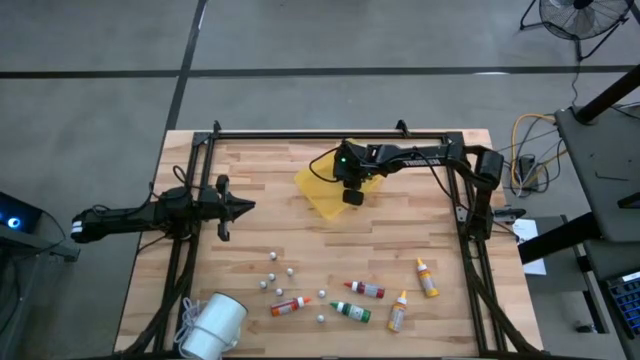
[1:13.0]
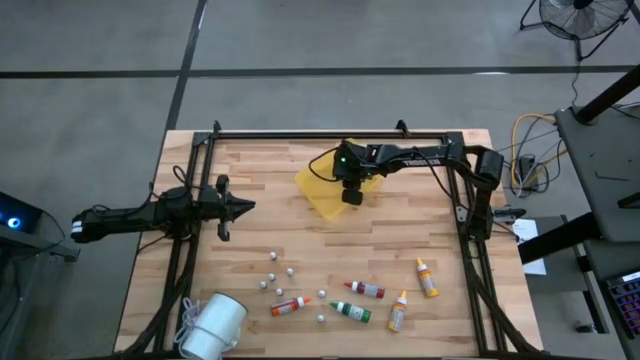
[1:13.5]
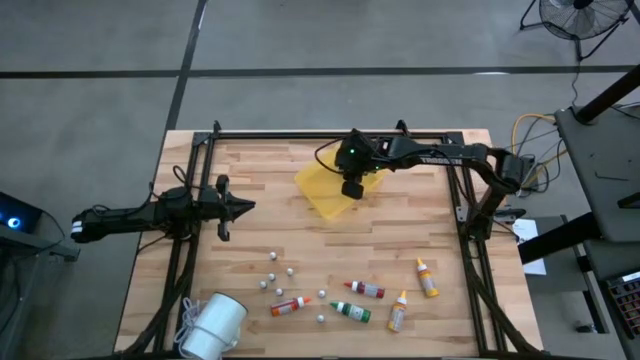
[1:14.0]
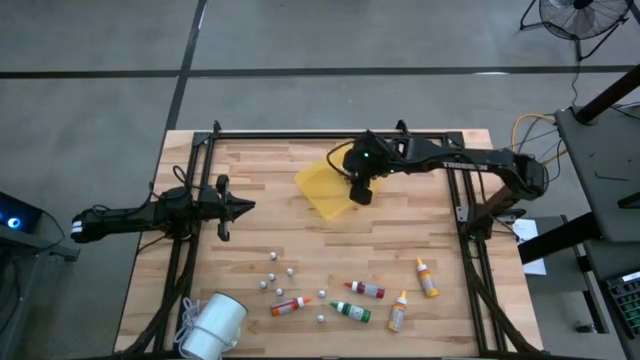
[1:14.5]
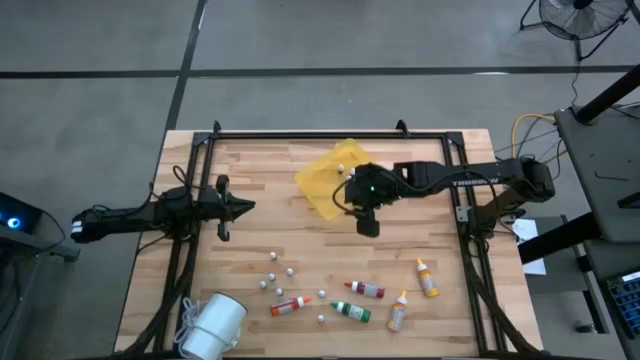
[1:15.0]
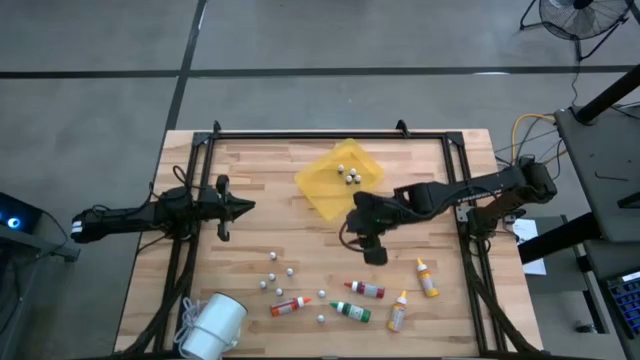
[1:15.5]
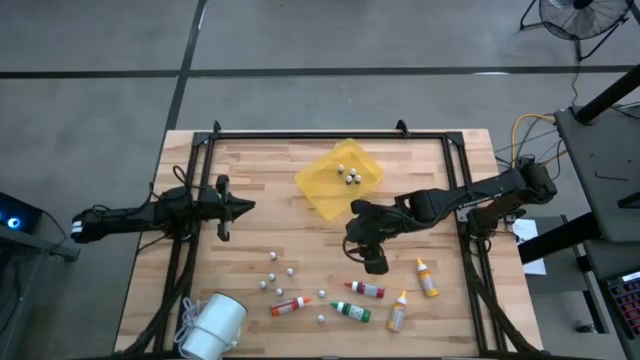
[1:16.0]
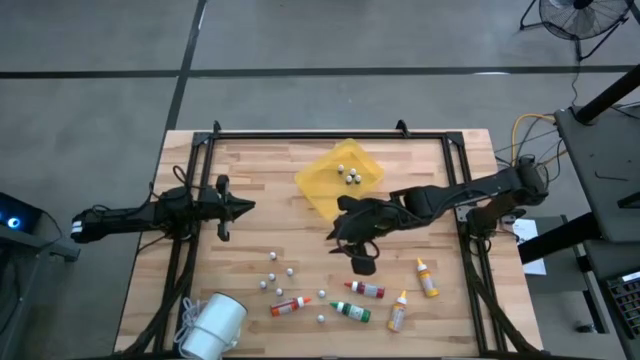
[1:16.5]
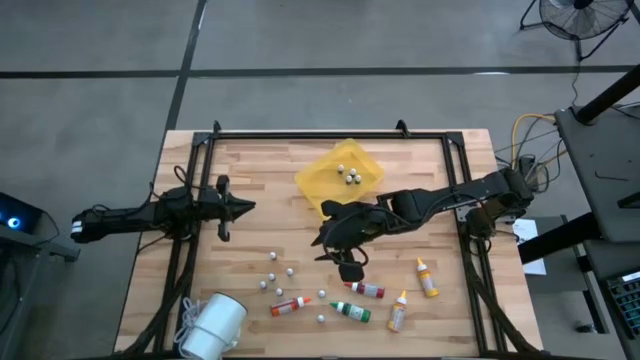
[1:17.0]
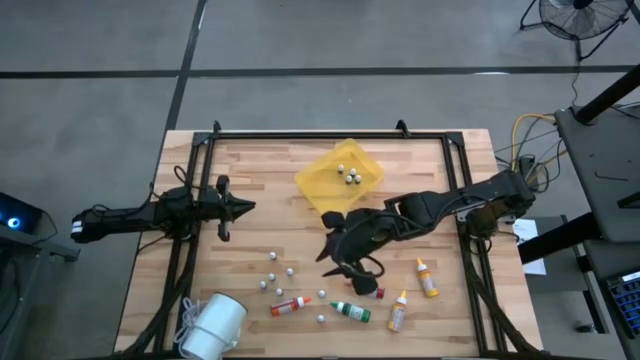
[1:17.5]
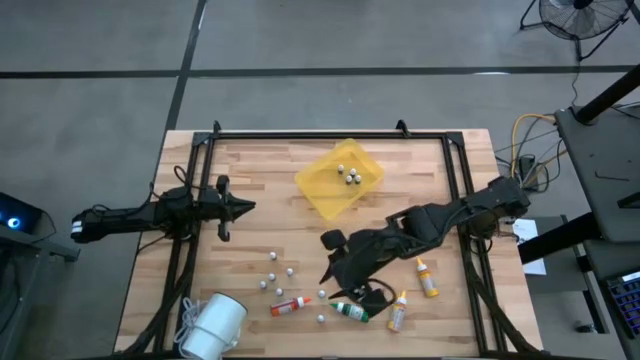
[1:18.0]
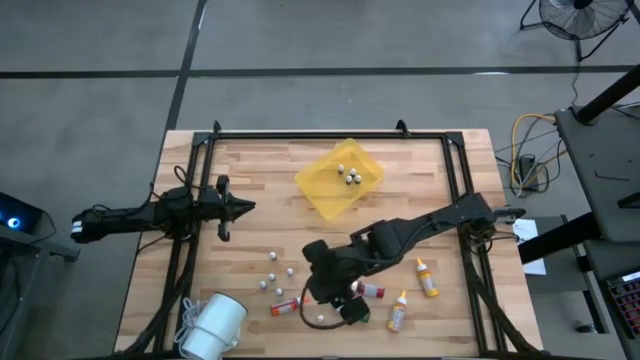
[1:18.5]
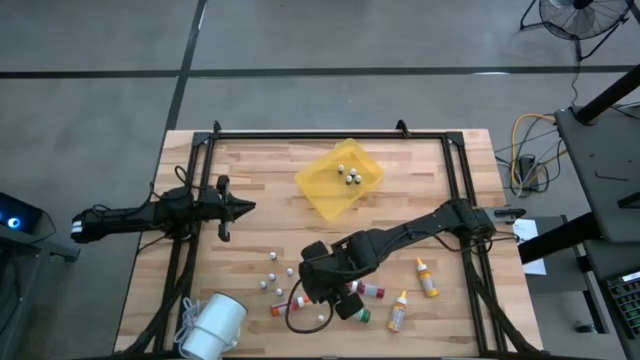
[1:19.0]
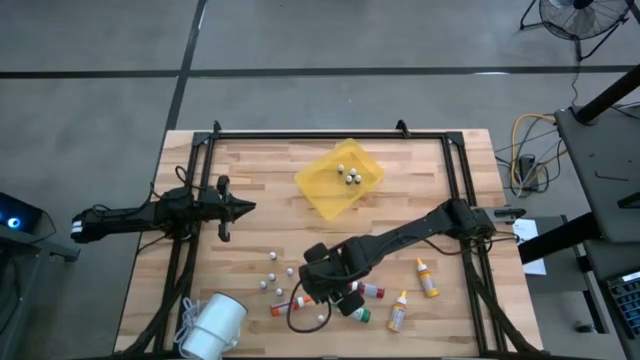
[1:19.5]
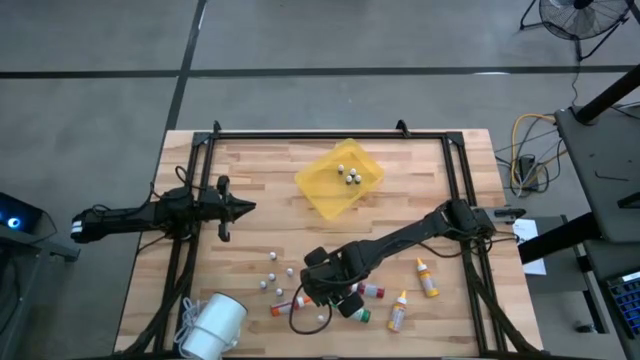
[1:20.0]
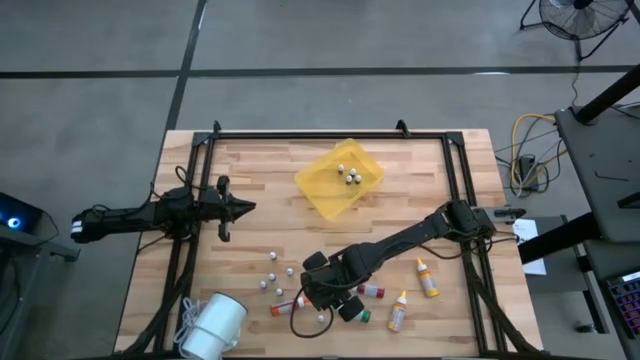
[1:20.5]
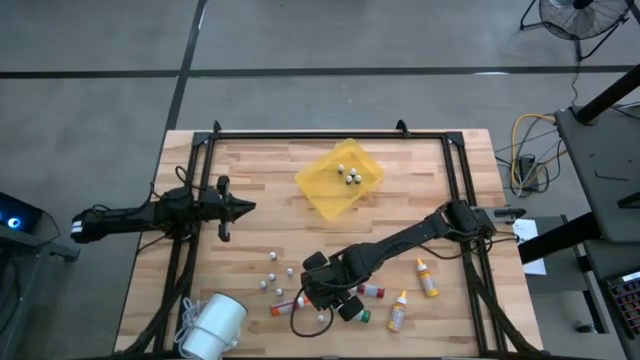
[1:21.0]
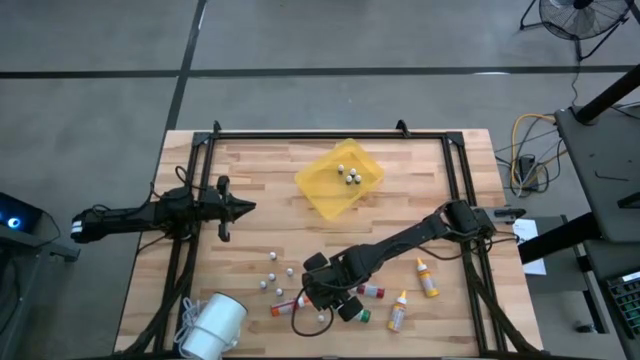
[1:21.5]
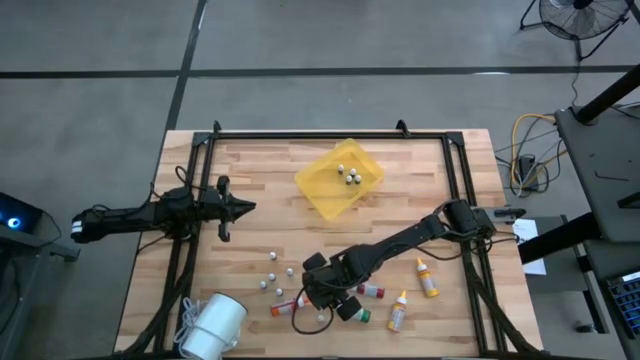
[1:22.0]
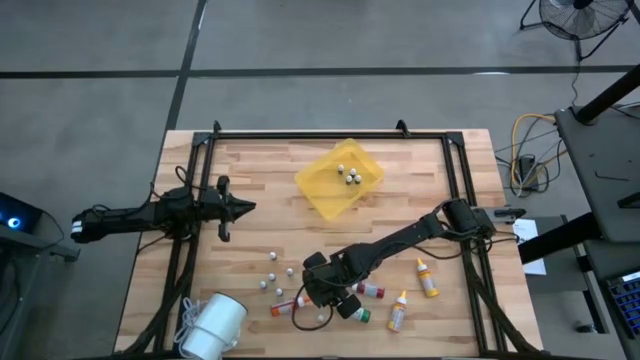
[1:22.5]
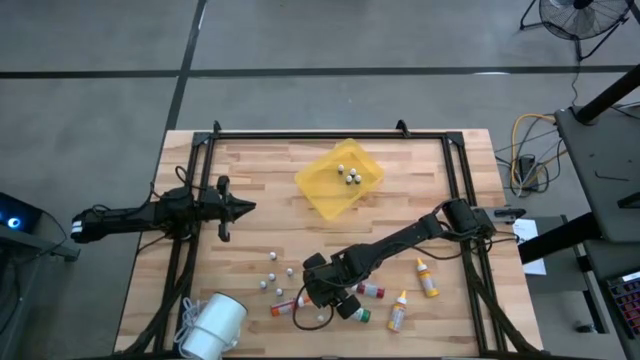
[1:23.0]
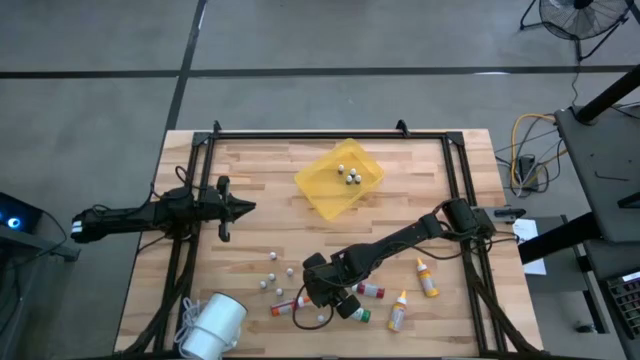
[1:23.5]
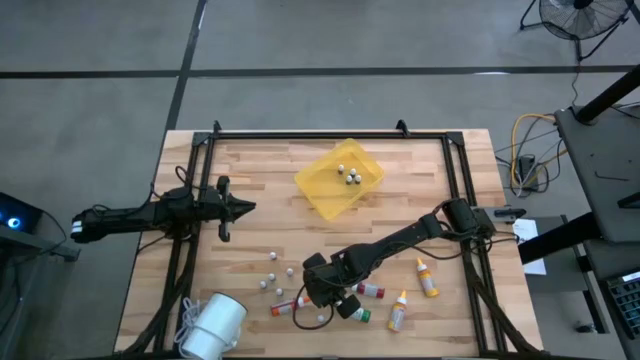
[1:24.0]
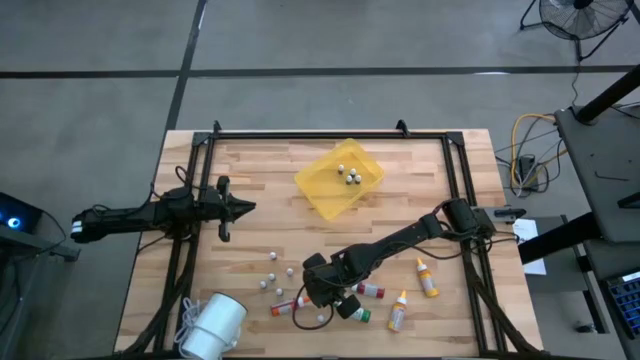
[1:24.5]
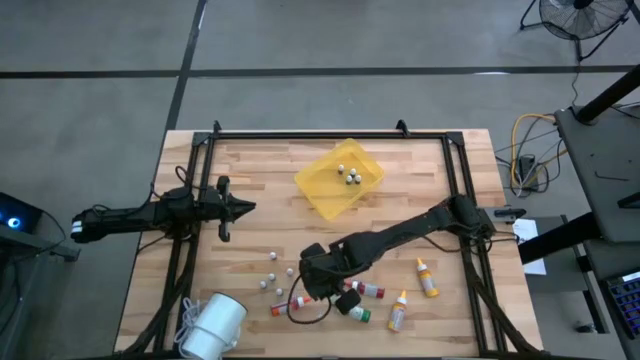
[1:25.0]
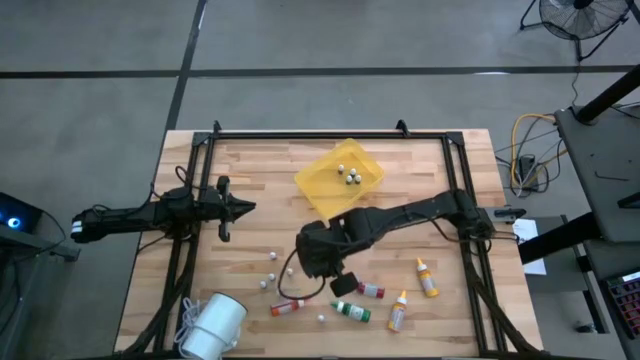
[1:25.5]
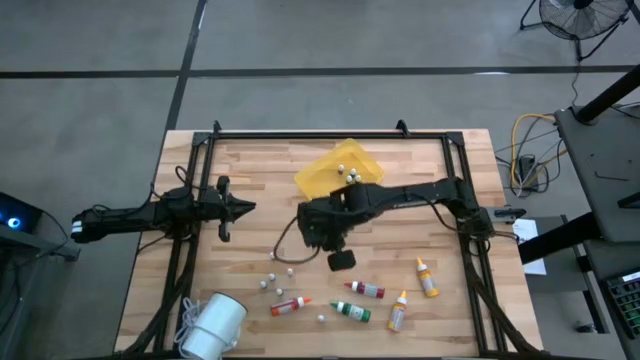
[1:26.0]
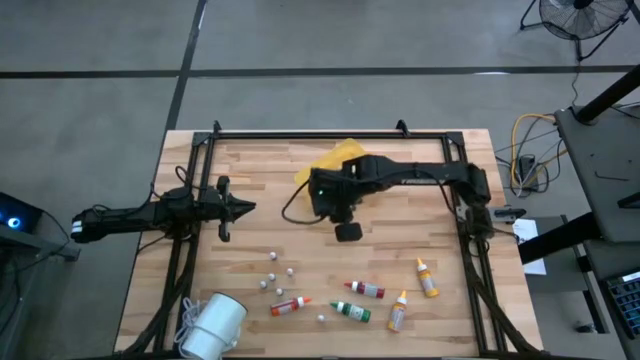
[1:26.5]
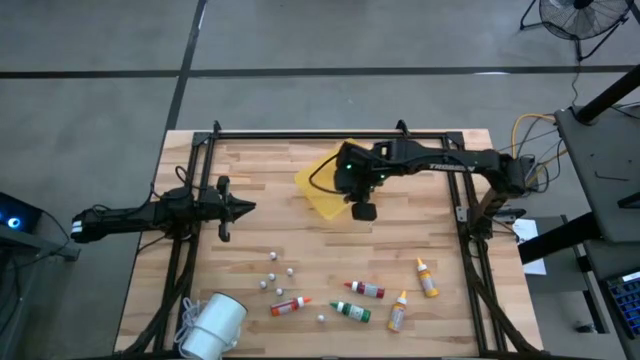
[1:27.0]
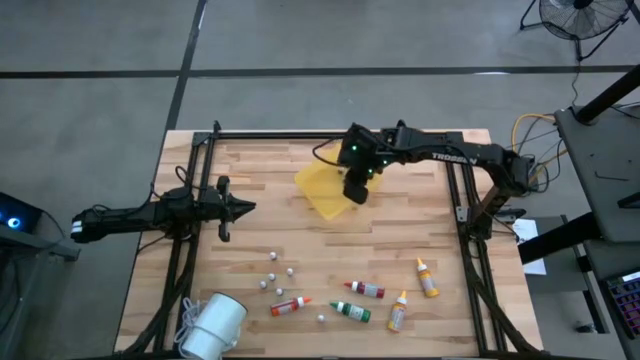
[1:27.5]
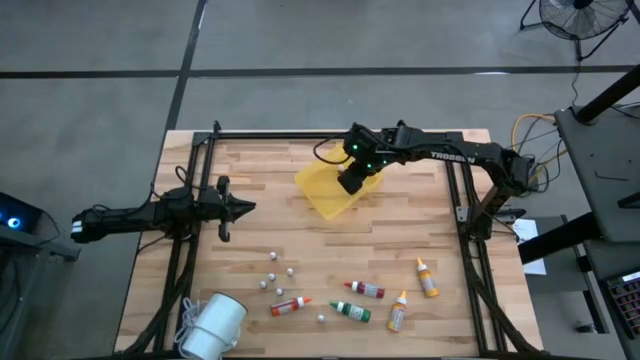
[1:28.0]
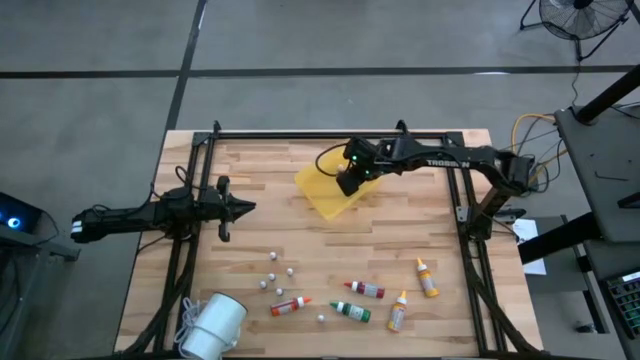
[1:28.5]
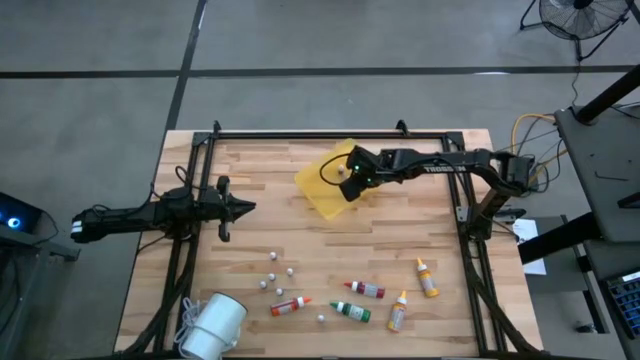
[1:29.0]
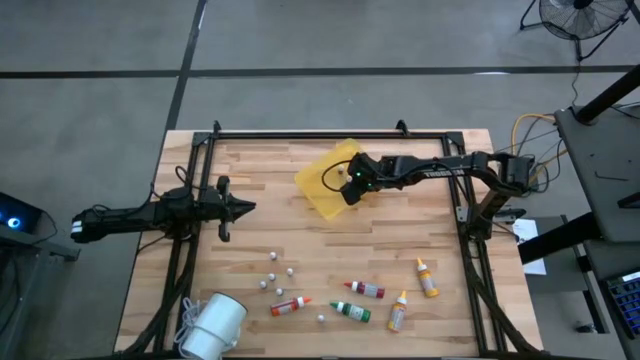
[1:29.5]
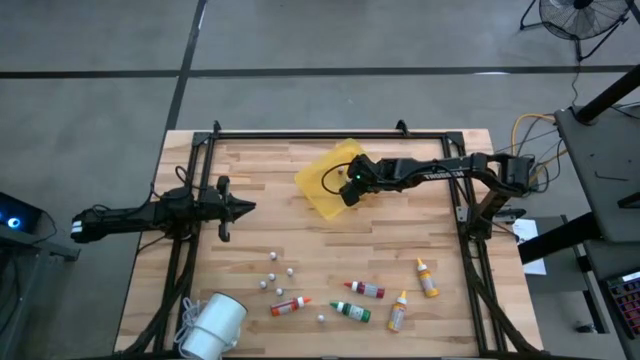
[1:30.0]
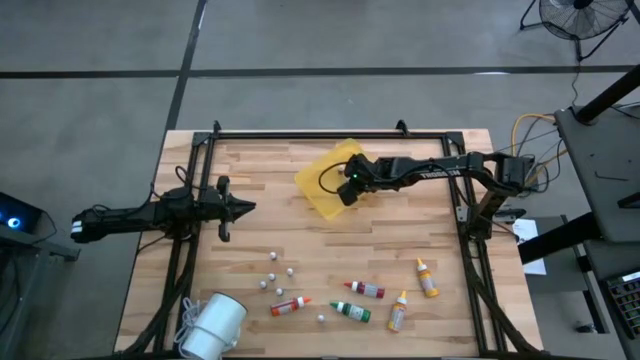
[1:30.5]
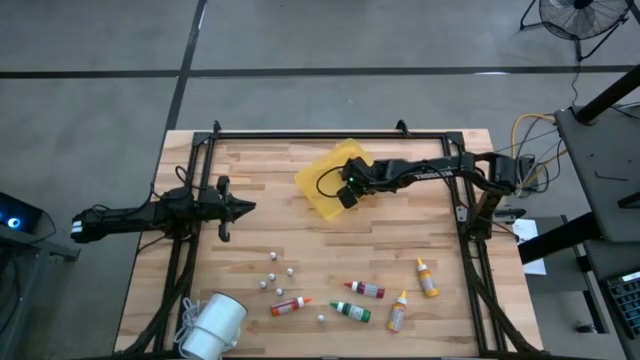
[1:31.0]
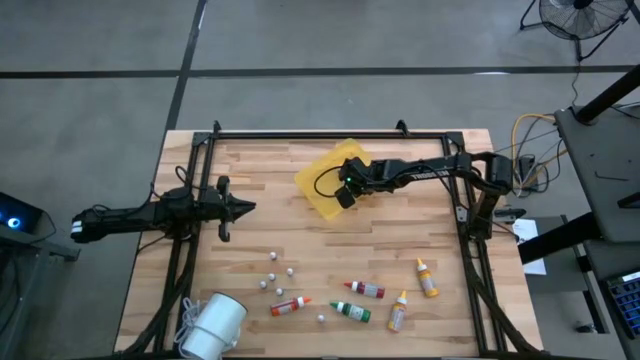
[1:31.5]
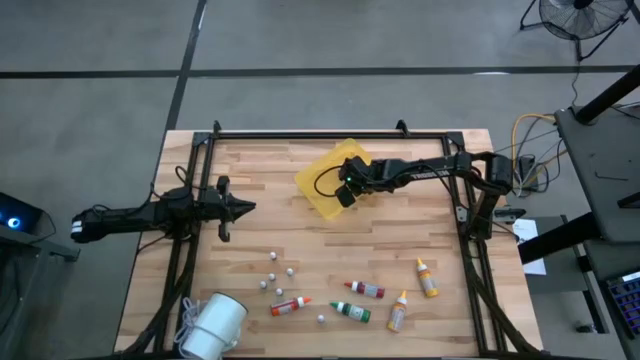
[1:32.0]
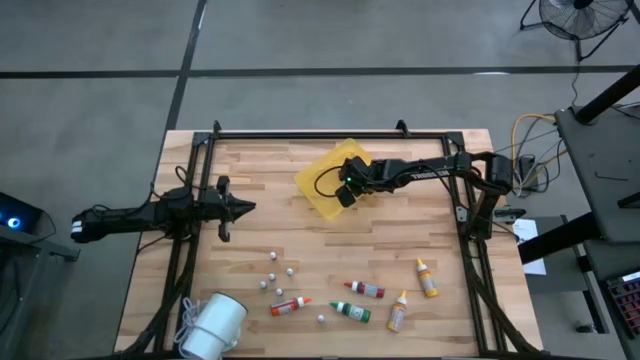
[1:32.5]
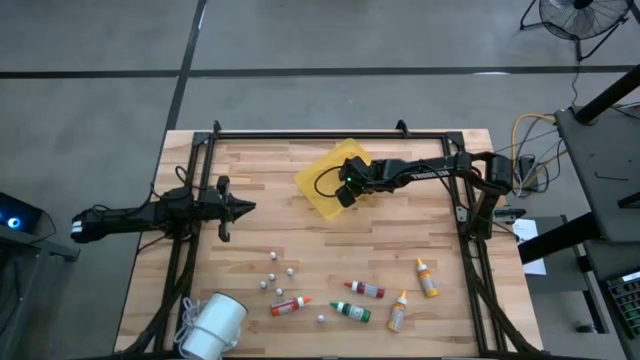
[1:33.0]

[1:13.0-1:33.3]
Task: Pick & Place food coloring
Put the small red food coloring bottle into the yellow bin
